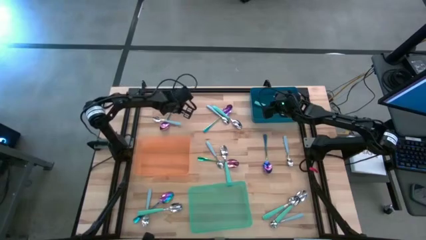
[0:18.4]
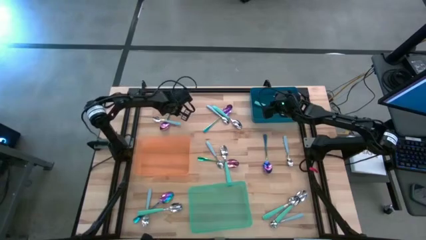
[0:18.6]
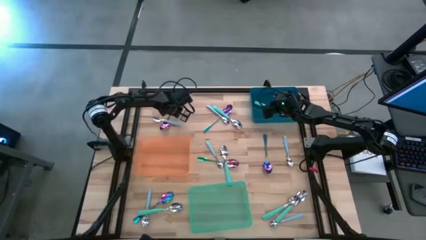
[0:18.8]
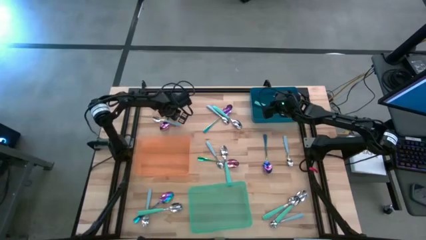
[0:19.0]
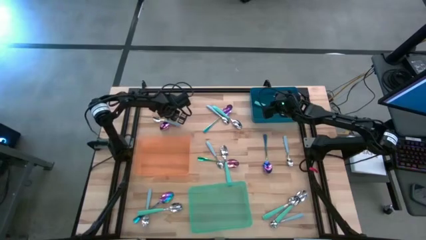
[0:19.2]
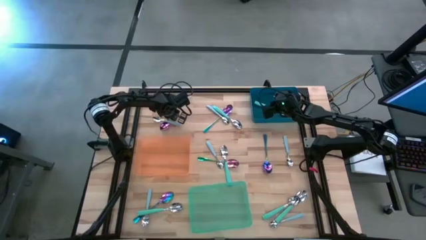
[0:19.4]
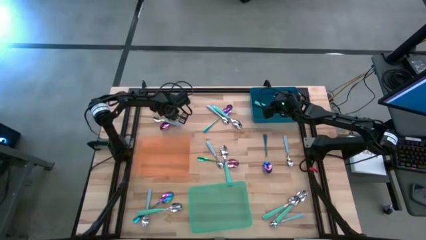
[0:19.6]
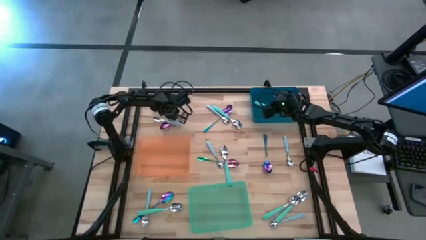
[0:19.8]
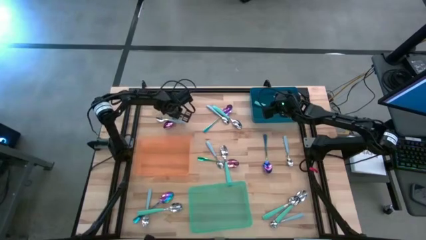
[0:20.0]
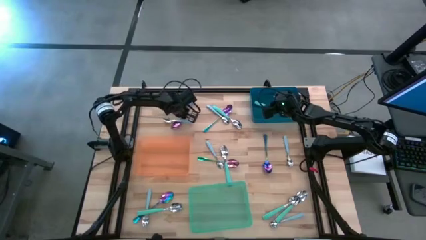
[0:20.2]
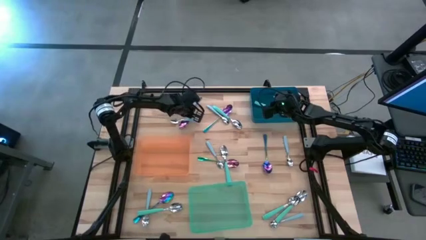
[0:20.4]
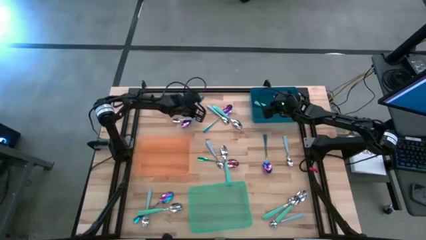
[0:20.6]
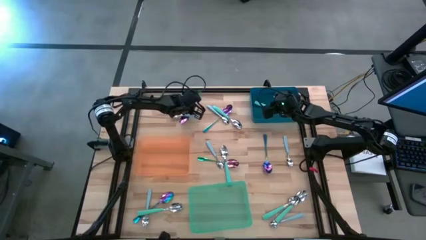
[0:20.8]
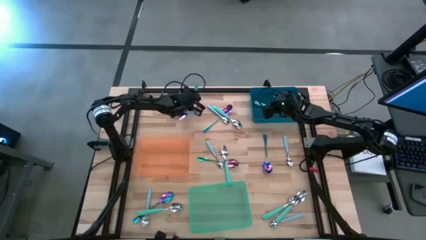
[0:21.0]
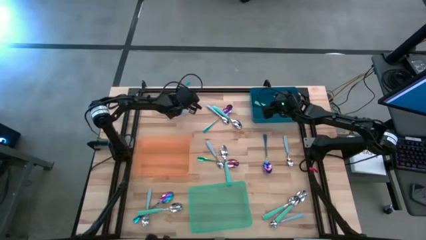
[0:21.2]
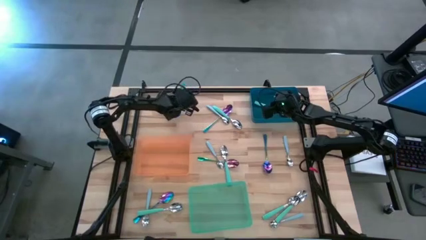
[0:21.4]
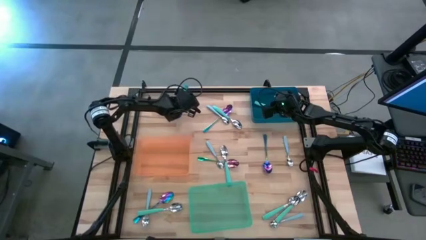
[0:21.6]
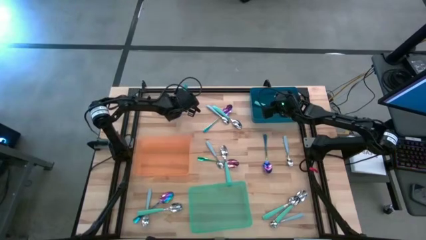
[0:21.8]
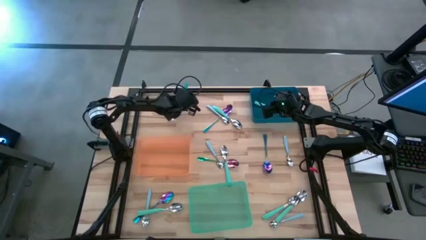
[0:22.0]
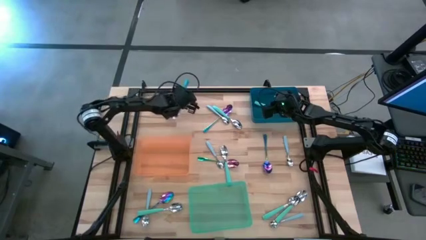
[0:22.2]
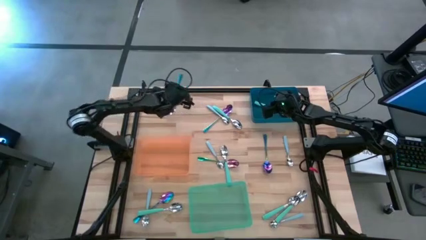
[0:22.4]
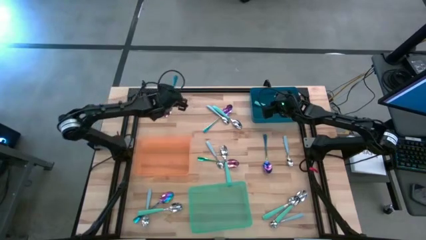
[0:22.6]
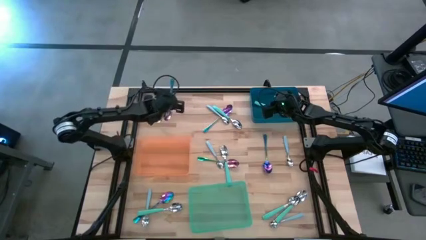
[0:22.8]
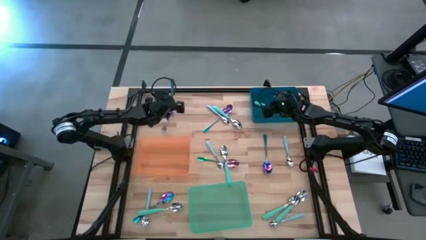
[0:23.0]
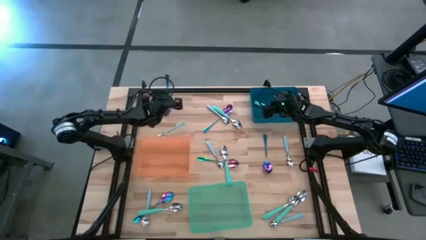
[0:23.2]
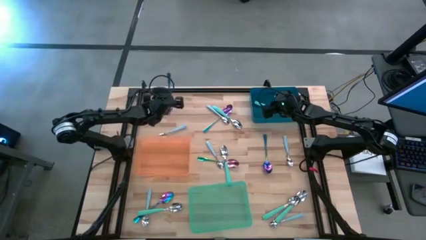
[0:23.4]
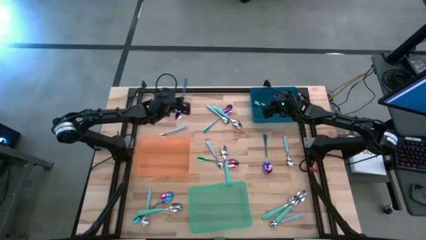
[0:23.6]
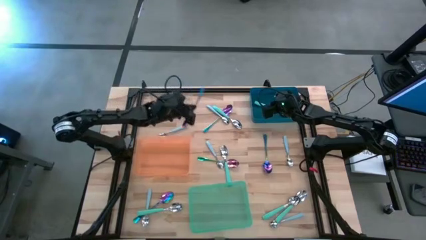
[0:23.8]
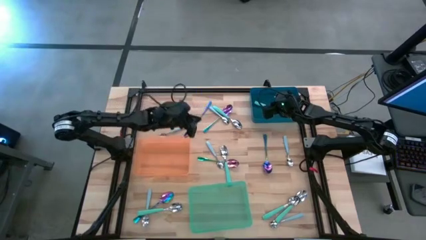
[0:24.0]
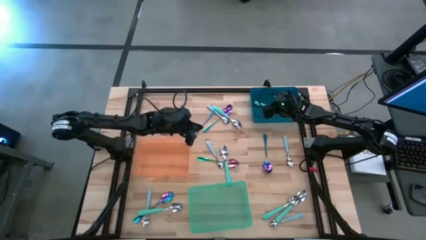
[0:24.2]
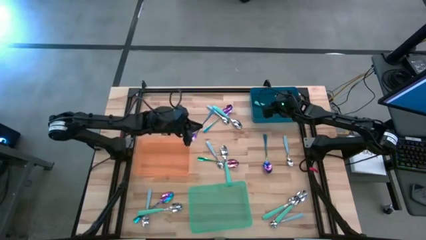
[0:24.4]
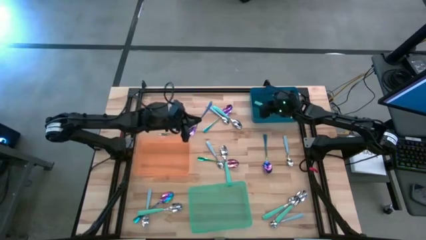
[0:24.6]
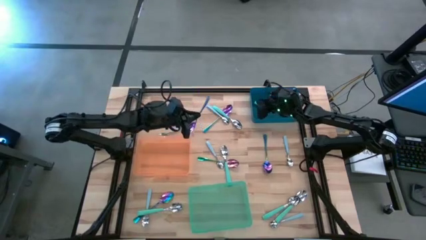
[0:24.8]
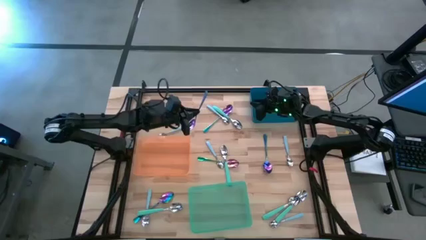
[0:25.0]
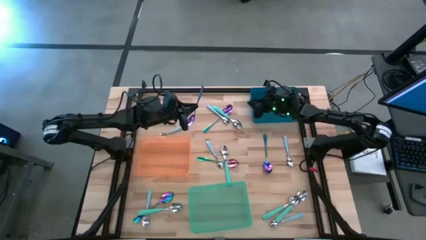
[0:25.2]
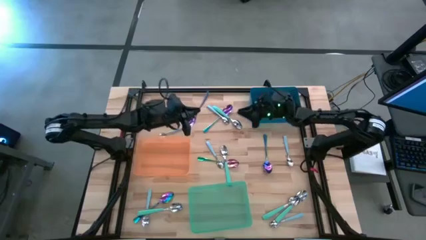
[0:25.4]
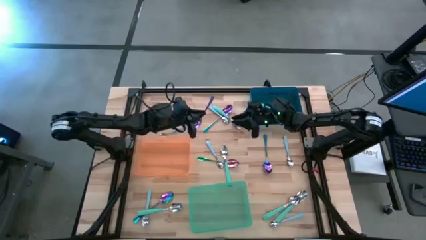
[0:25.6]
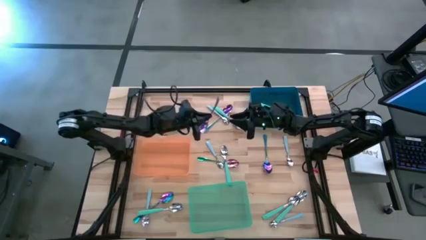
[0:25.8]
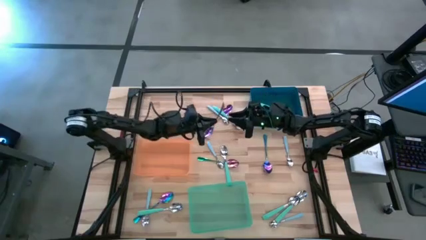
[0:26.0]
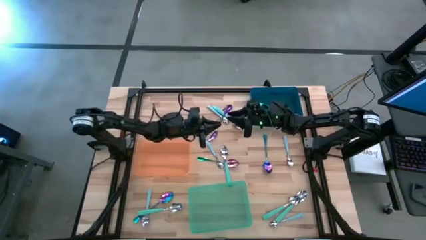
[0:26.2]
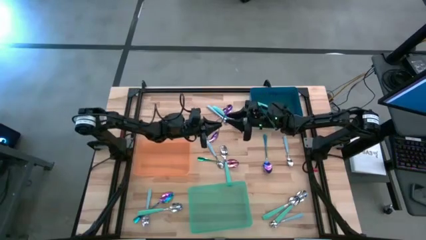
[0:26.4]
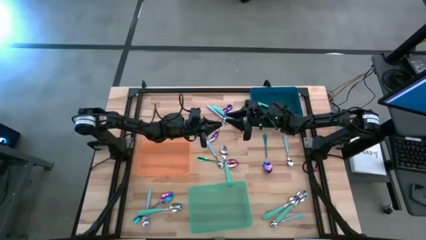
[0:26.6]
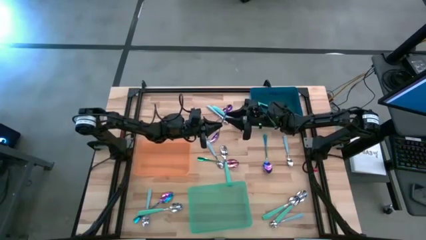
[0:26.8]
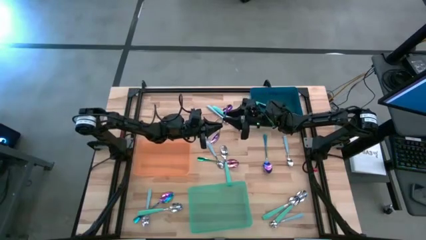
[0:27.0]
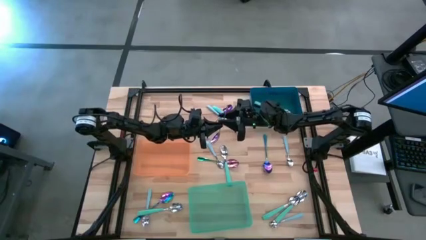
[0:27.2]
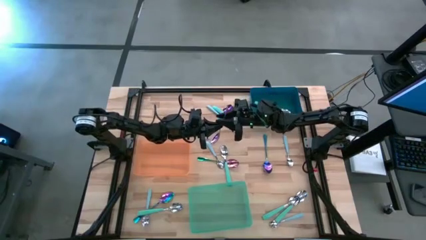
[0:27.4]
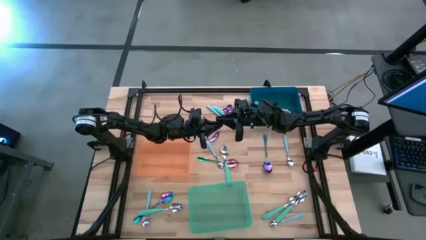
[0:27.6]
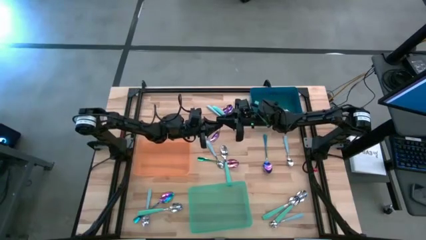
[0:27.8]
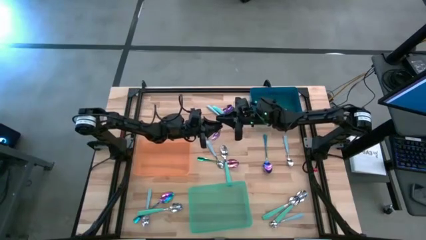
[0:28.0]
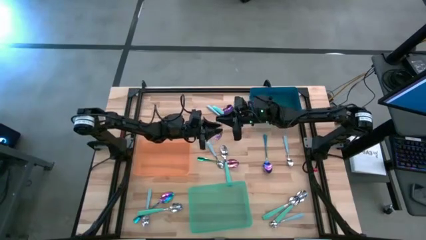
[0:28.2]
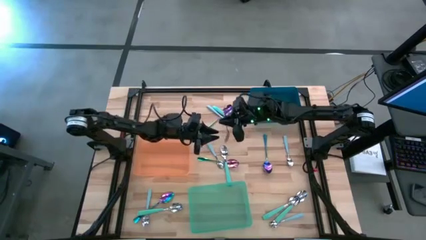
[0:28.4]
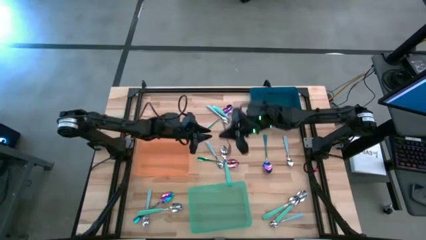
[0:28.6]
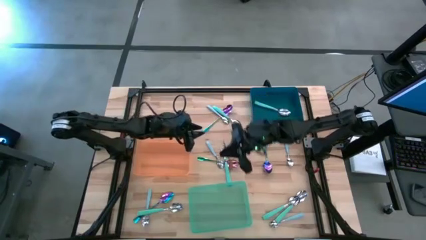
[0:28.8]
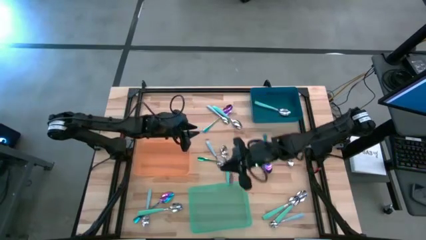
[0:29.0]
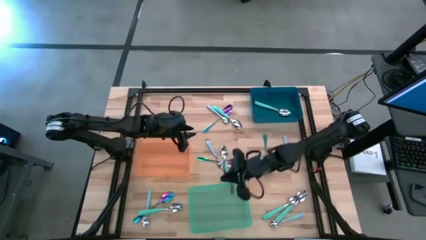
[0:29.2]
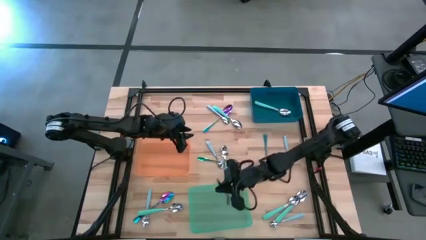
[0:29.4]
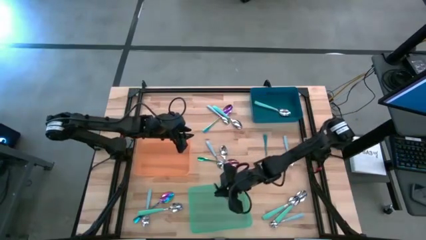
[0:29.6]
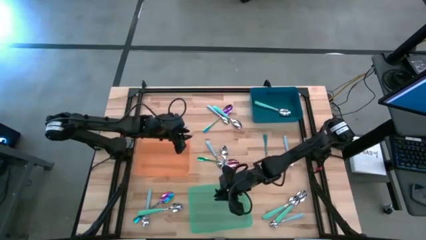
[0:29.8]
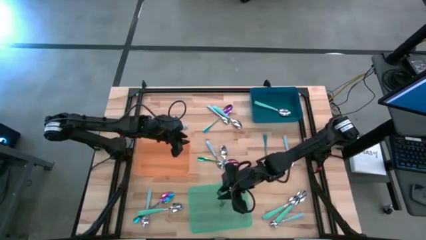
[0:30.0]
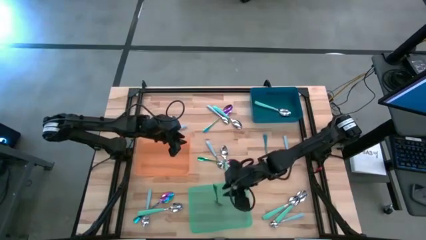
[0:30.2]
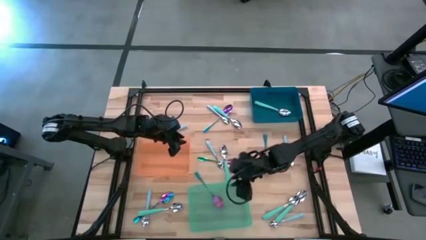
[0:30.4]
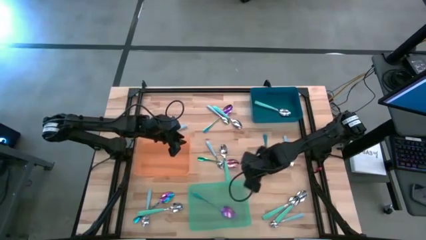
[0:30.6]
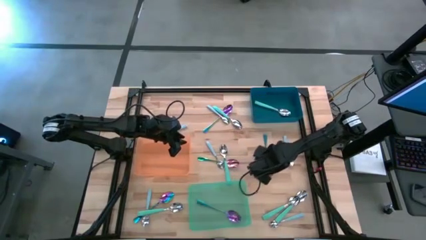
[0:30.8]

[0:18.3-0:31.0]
Task: Sort silverware by color (type)
Put the top left purple spoon into the green bin

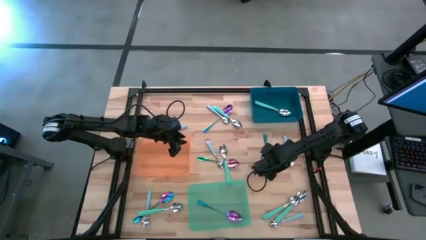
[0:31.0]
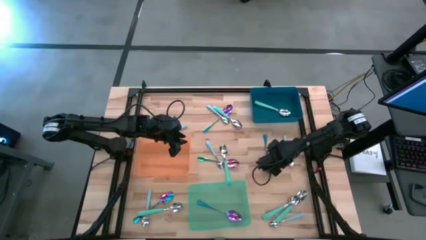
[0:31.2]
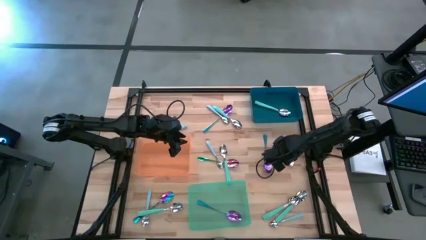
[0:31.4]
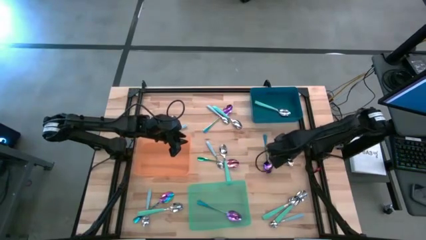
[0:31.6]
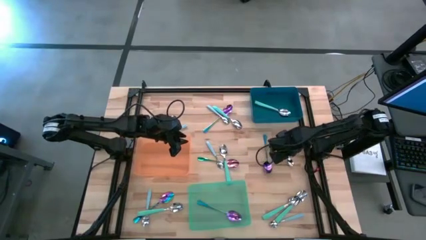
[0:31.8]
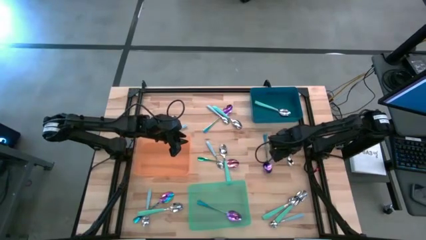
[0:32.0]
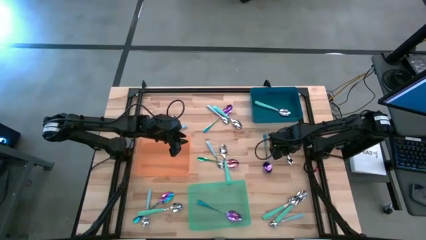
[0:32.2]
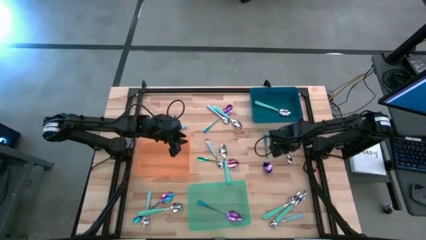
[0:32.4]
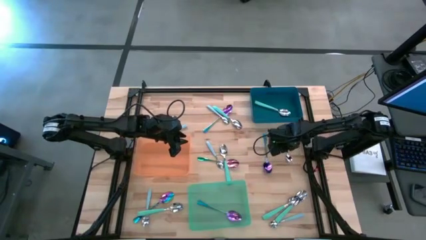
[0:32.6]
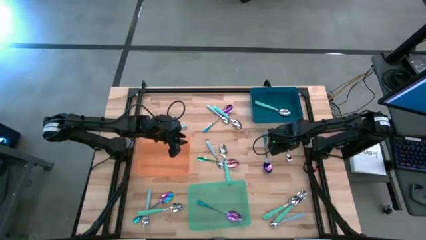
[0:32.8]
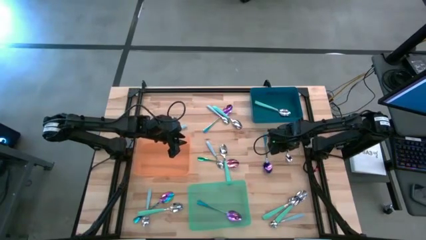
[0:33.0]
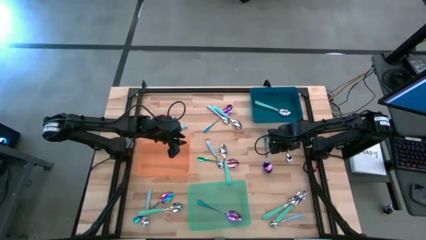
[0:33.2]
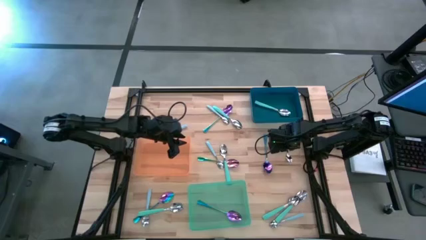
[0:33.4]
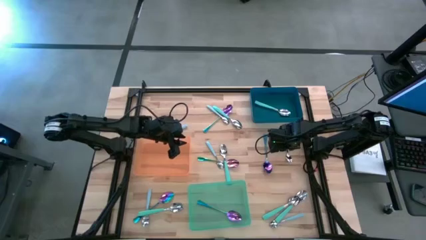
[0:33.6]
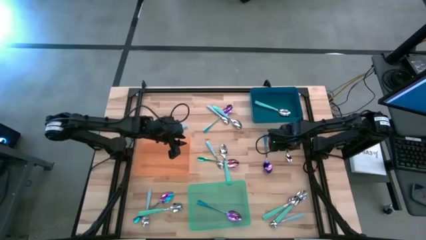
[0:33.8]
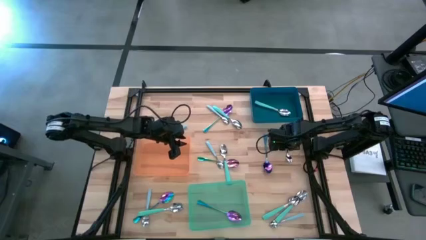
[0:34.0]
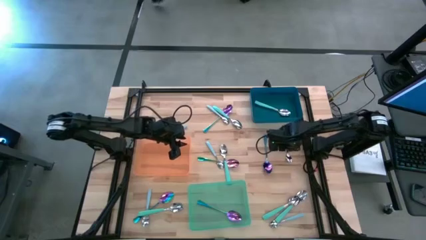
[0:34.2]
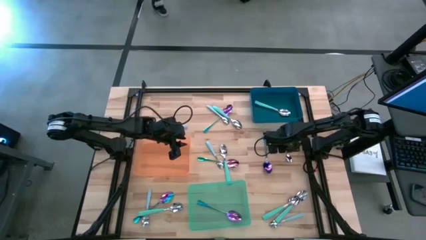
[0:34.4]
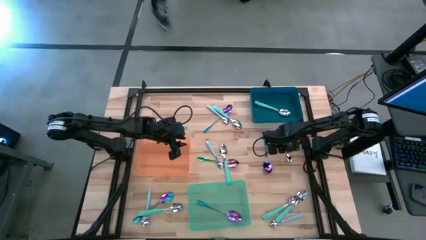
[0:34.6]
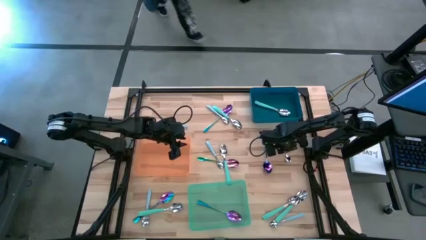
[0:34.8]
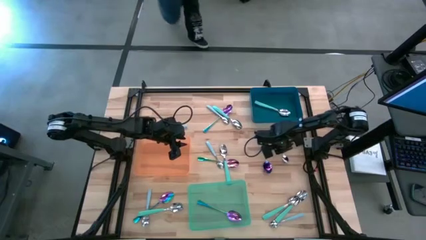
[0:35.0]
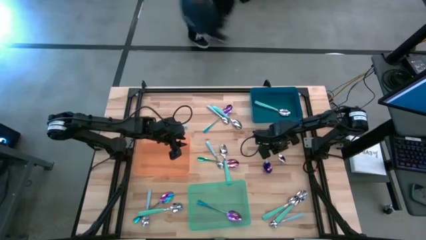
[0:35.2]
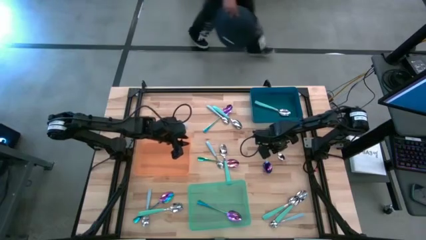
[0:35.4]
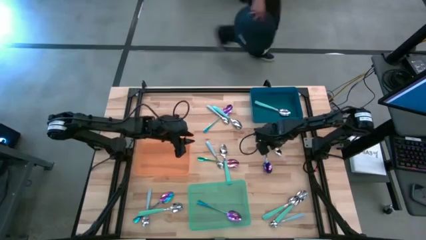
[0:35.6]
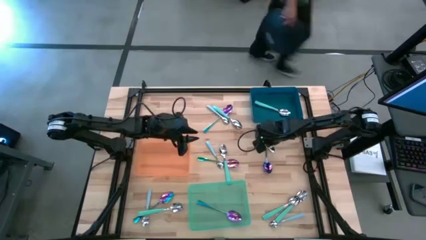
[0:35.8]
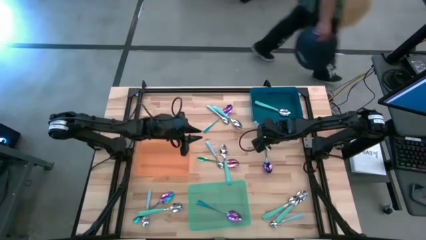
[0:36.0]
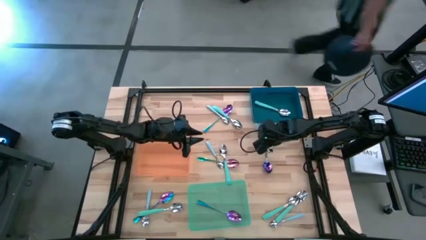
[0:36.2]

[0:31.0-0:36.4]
Put the blue spoon into the orange bin
